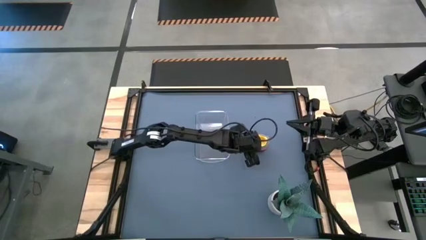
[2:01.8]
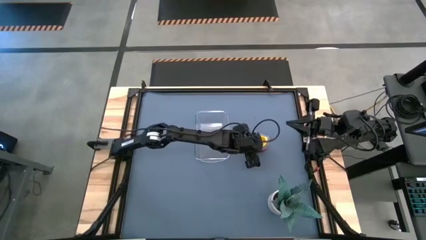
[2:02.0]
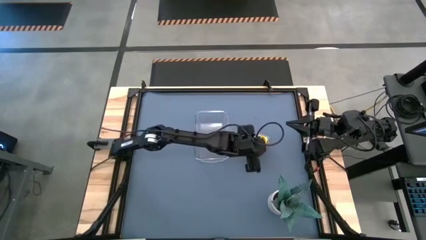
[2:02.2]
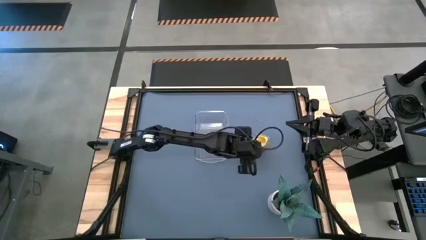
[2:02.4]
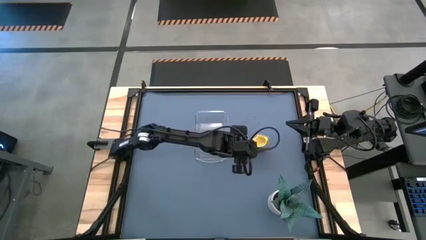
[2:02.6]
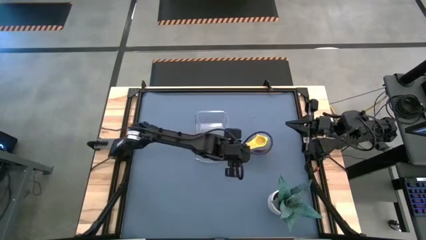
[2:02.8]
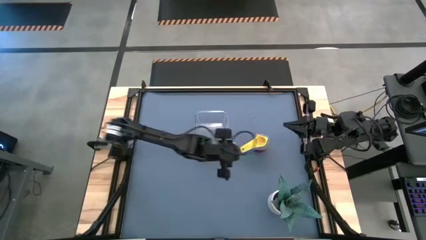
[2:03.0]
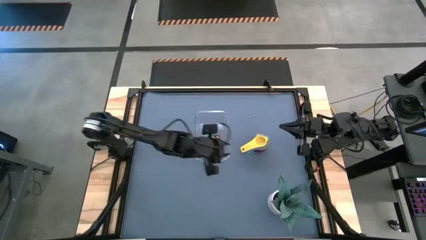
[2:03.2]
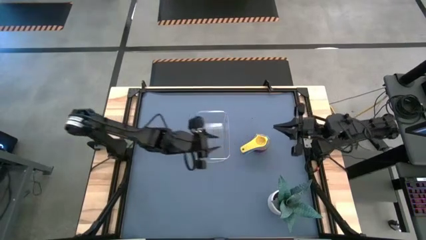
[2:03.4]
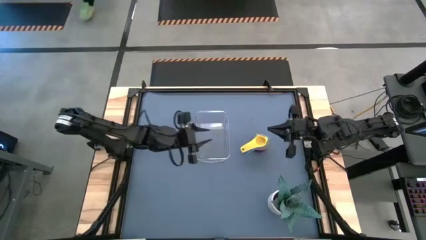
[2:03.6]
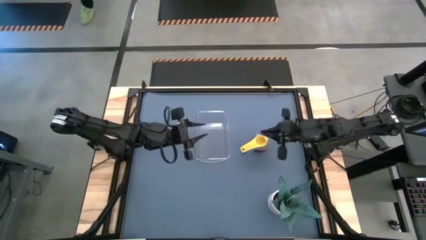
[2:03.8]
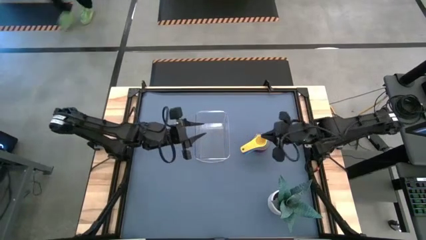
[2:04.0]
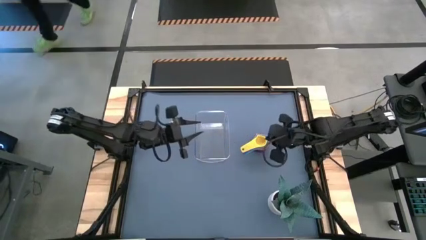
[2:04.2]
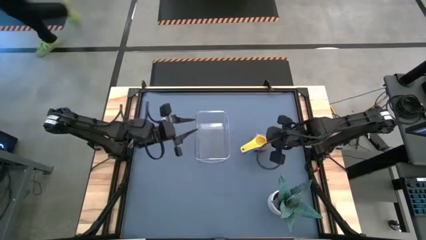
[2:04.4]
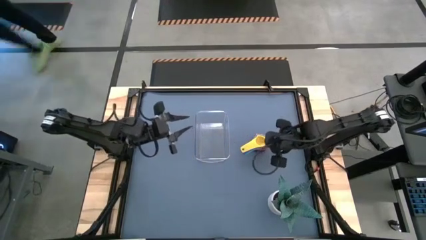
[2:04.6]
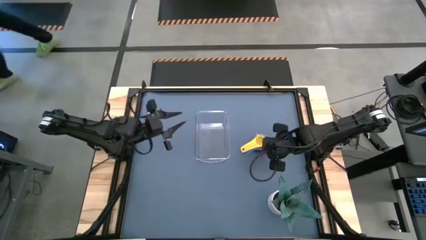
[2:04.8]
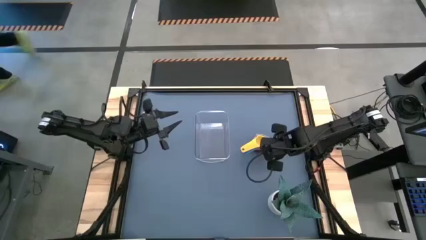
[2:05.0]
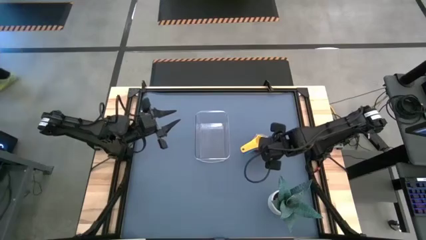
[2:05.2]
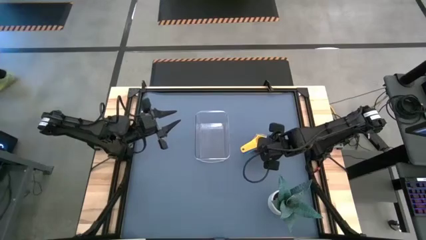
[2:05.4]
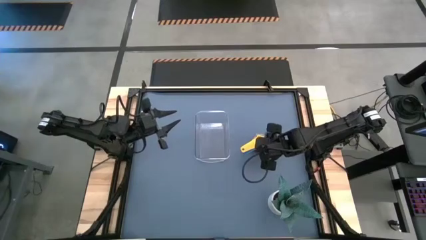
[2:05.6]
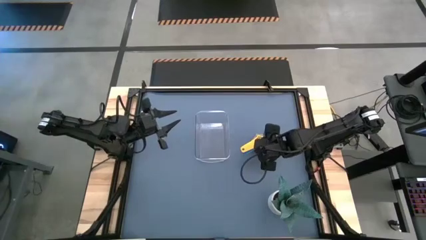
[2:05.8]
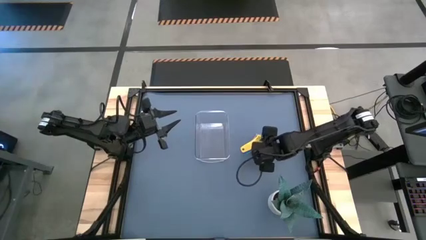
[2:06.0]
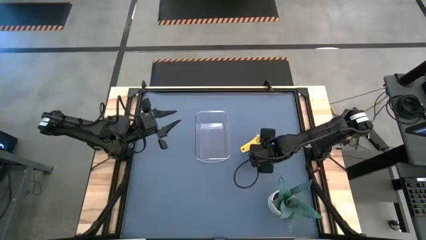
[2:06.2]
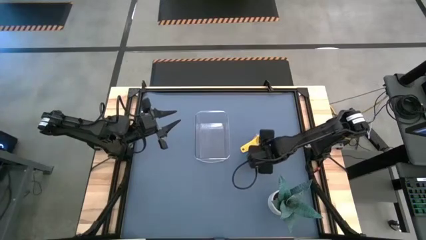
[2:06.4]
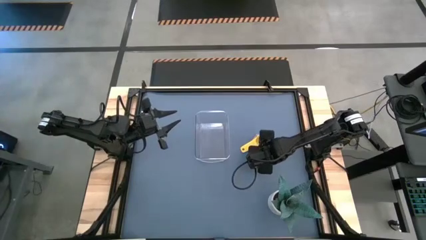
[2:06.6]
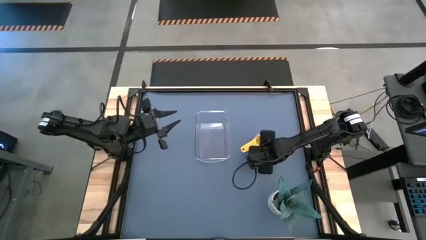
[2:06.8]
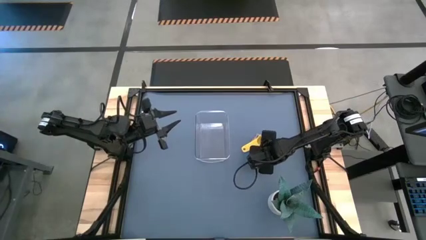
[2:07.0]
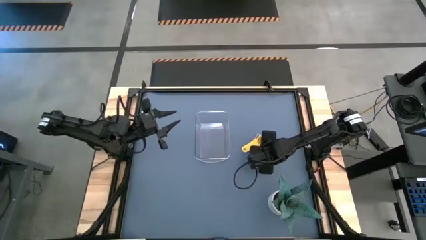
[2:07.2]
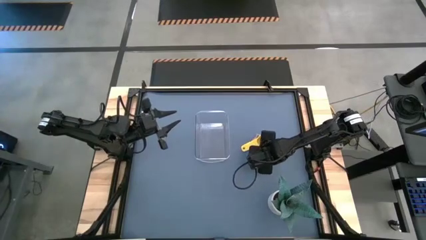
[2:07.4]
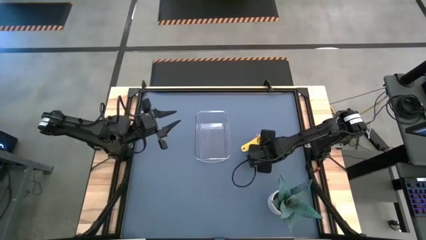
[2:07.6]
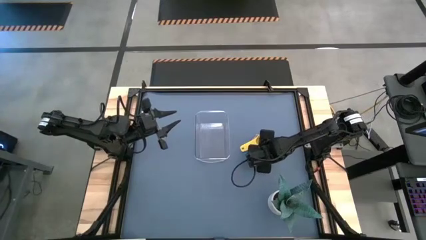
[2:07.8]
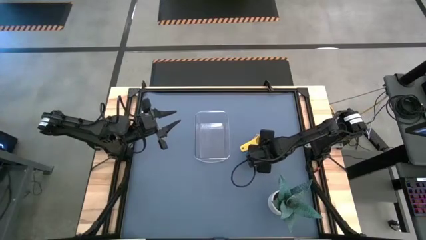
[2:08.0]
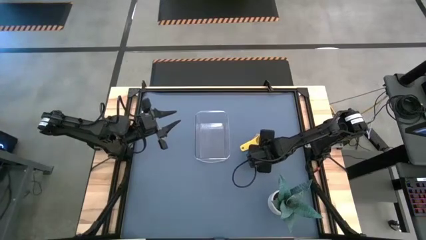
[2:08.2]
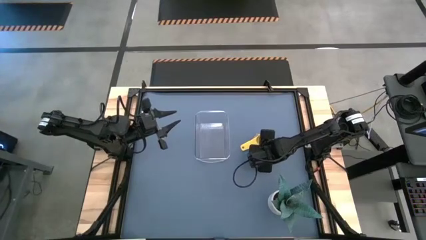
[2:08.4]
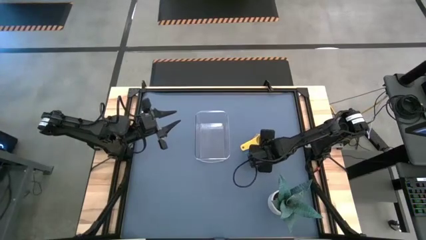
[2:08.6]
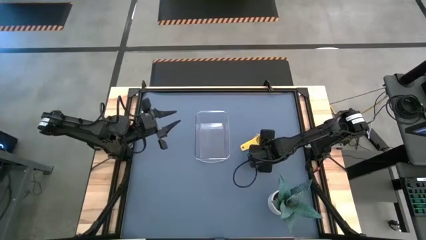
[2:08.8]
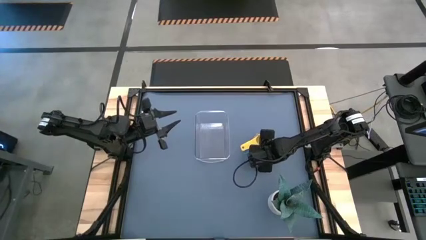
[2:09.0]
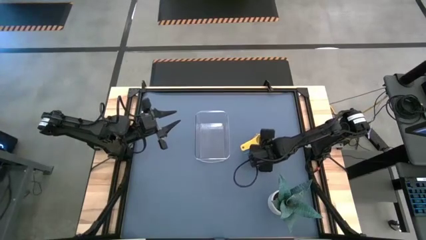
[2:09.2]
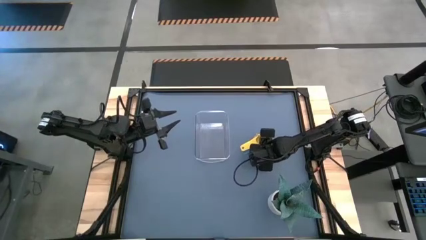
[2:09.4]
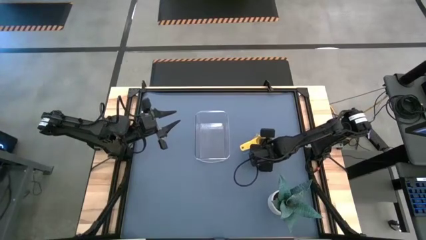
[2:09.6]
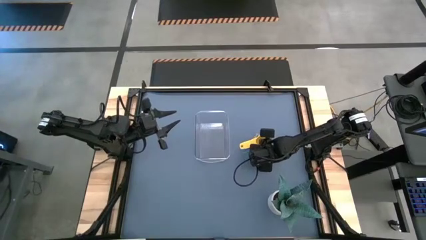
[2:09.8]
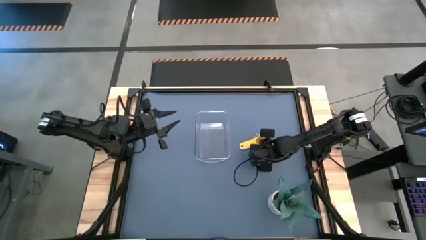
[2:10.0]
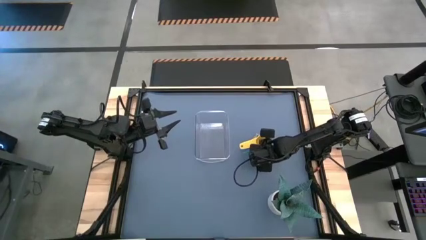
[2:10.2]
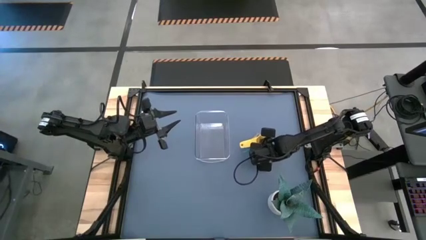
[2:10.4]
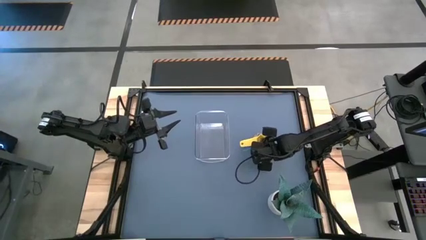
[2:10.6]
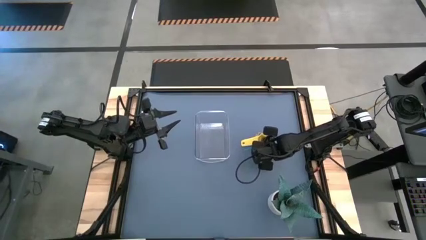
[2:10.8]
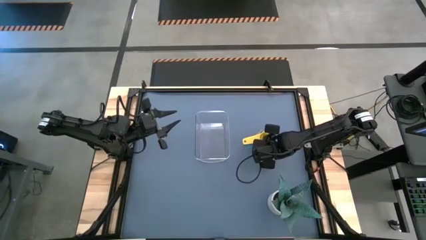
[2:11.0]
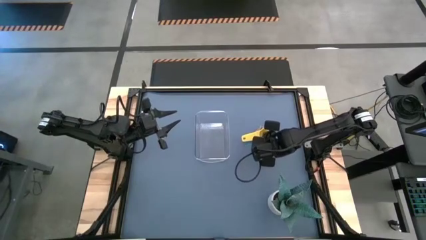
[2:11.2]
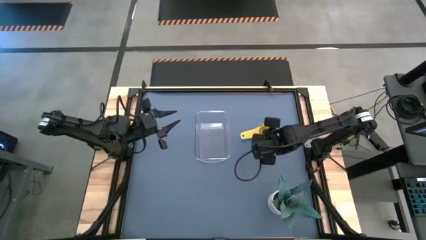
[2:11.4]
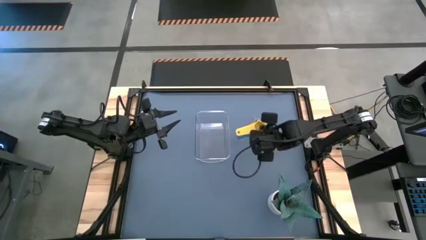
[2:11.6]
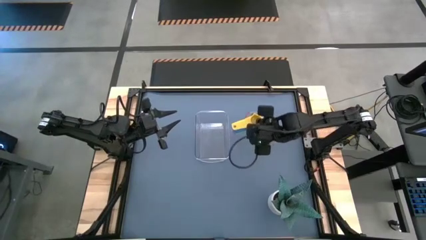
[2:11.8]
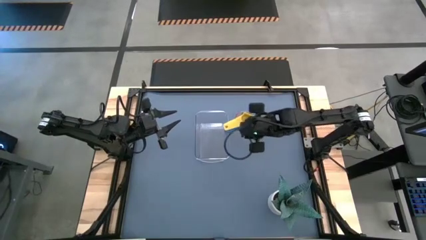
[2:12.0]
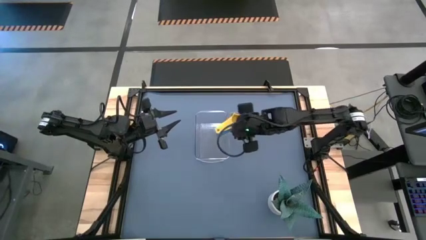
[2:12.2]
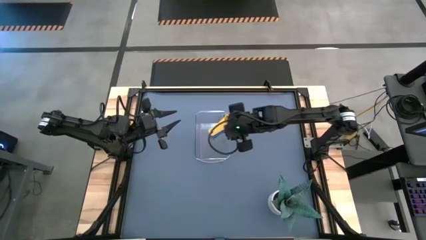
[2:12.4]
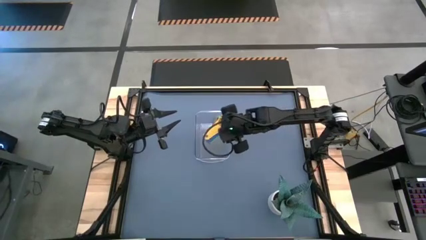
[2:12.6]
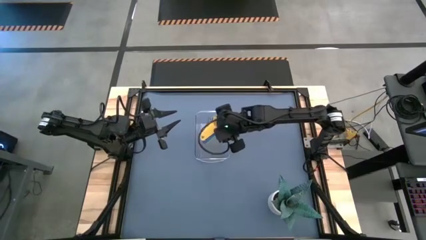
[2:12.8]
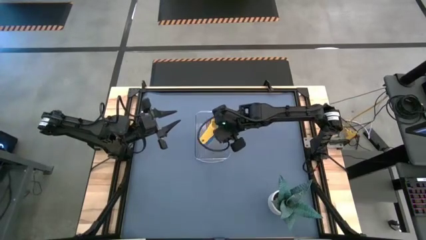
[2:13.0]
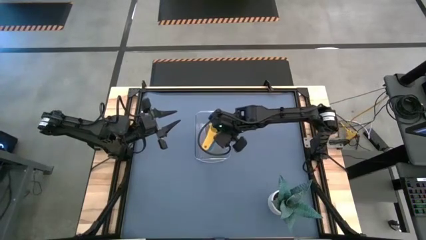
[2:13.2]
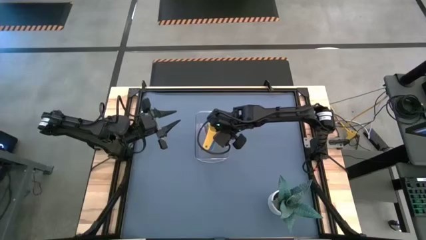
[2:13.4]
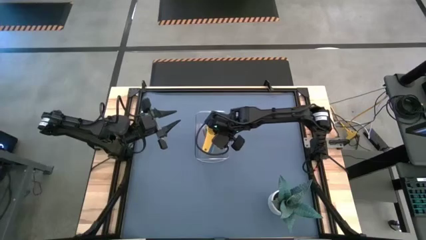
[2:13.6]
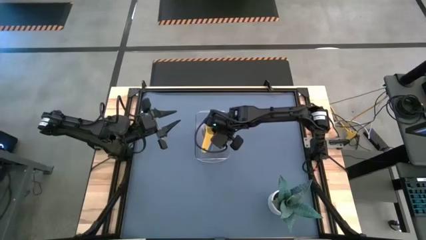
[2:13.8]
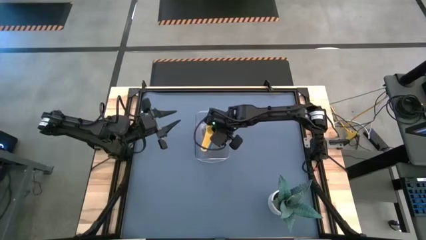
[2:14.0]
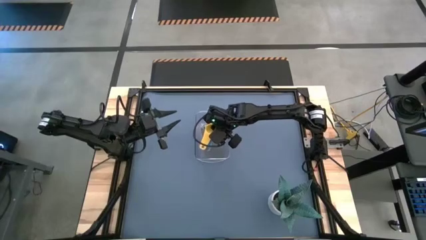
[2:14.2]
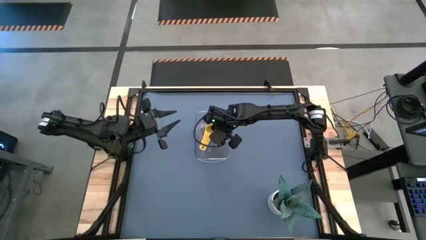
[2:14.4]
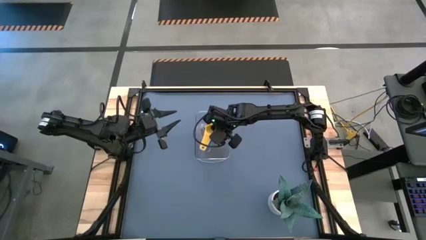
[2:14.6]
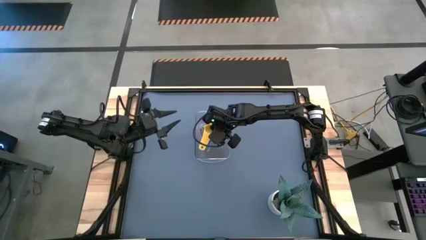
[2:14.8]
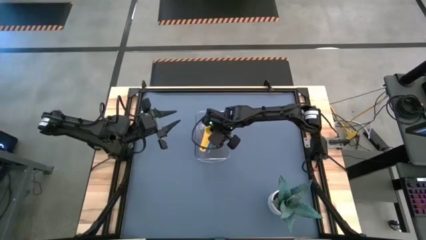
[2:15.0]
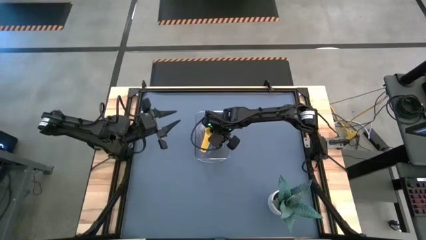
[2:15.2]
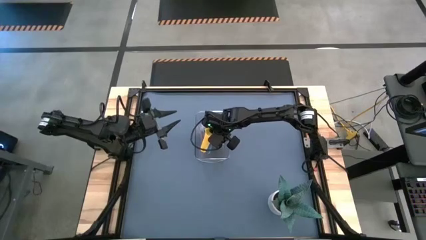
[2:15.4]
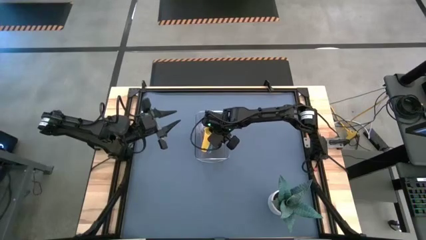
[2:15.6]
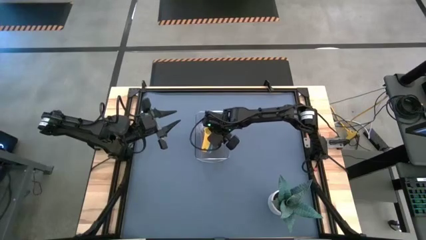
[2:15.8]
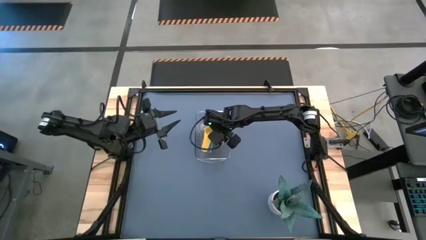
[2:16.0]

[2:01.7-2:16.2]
Task: Nest measuring cups in basket
Put the stack of measuring cups into the transparent bin
